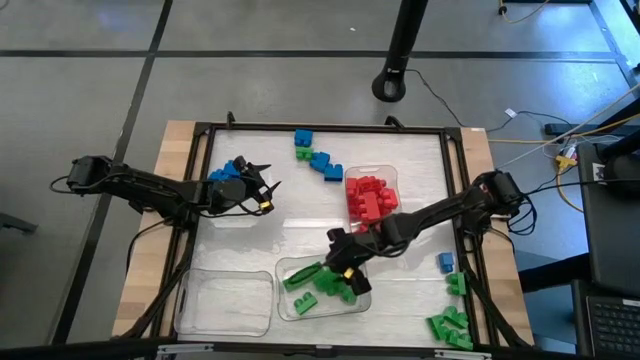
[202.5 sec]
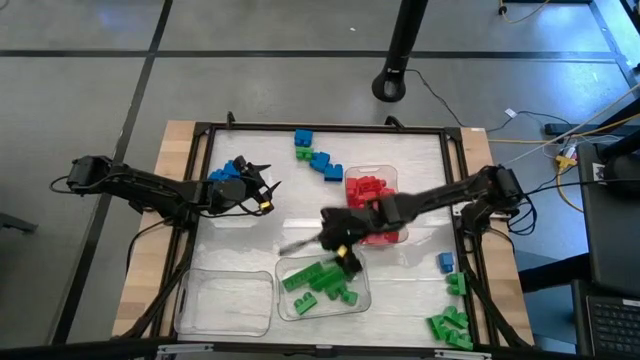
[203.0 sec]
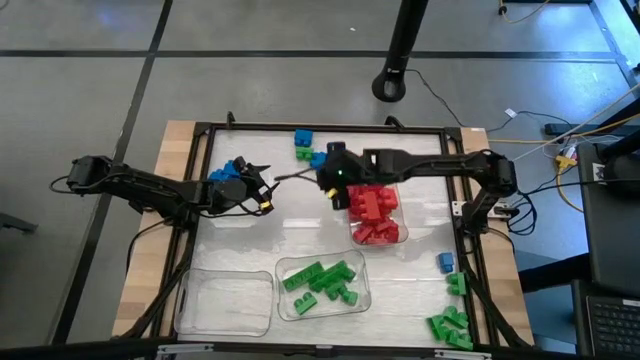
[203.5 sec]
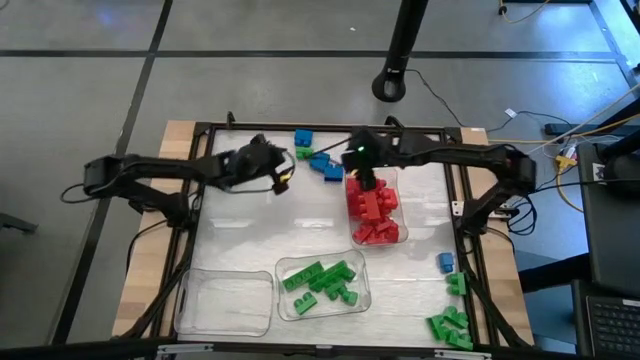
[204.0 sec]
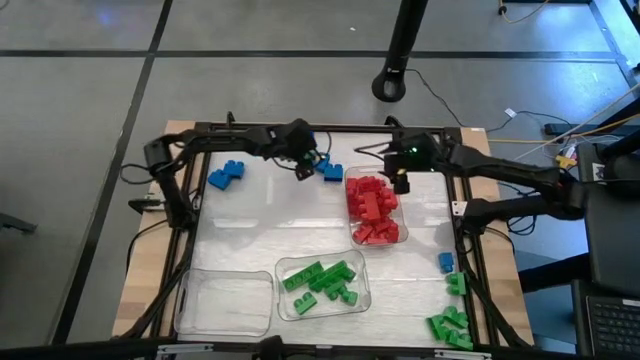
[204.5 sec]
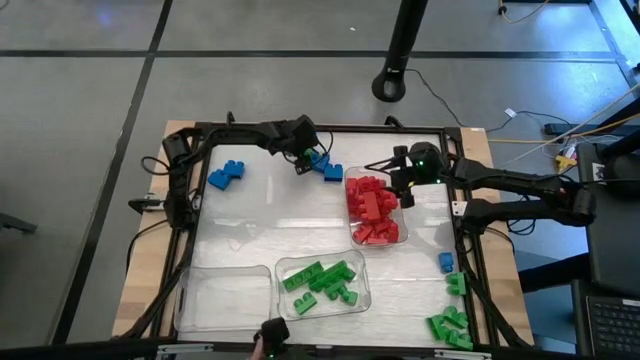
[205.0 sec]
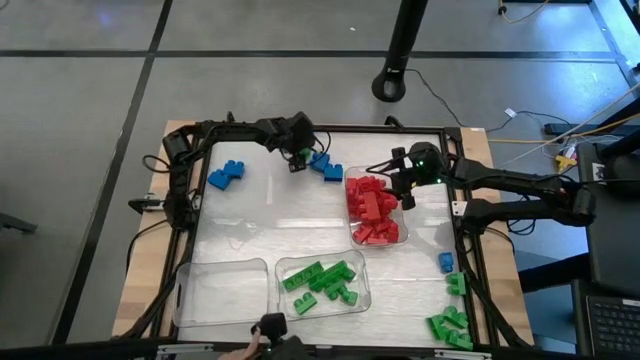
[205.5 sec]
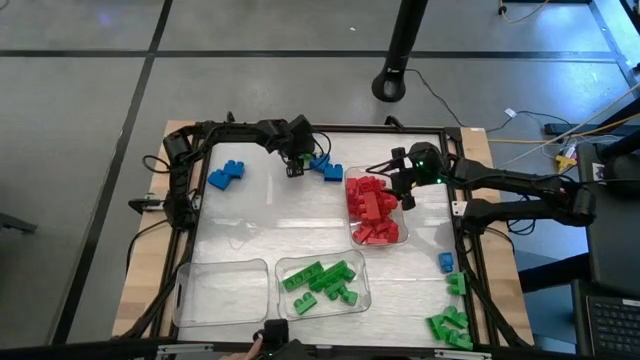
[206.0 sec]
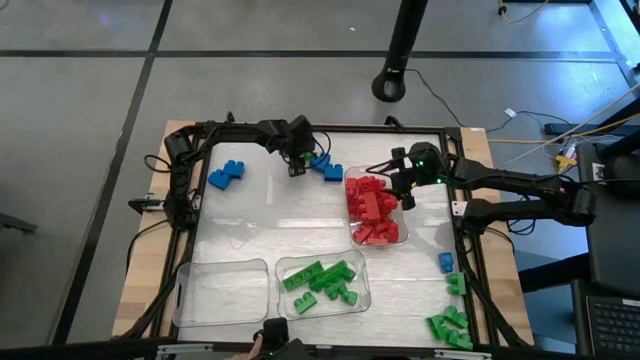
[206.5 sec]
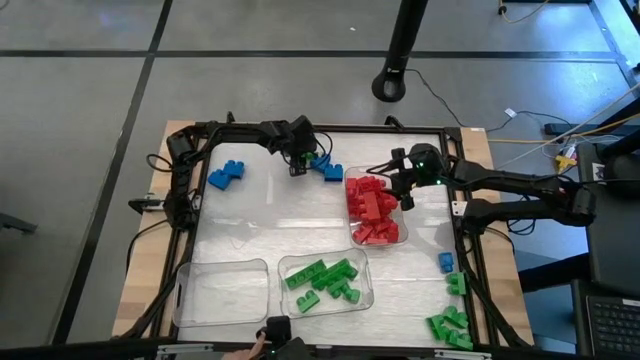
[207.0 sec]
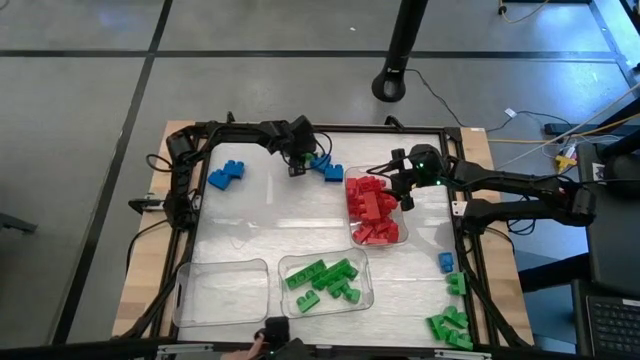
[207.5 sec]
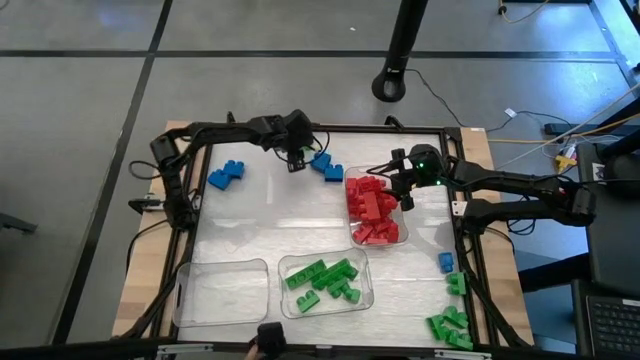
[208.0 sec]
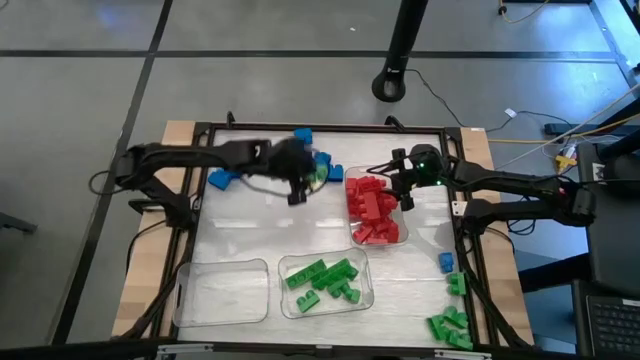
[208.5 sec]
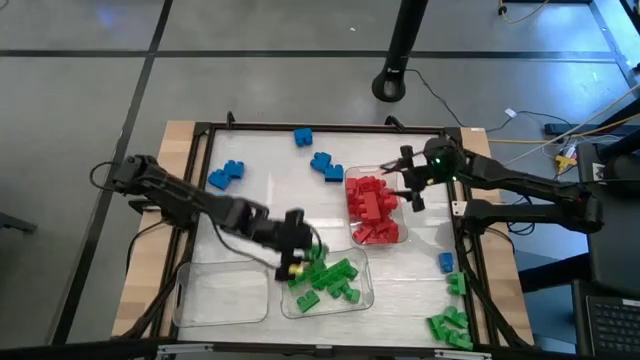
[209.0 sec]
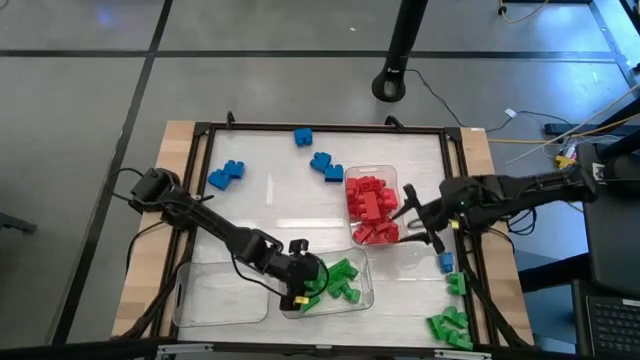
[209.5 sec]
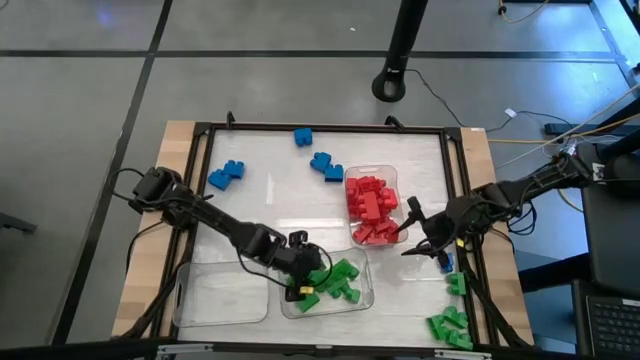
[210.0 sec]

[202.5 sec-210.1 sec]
Task: Sort blocks
Put the green game piece into the bottom right transparent bin

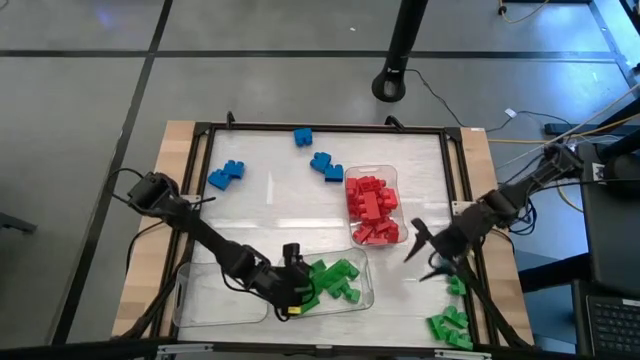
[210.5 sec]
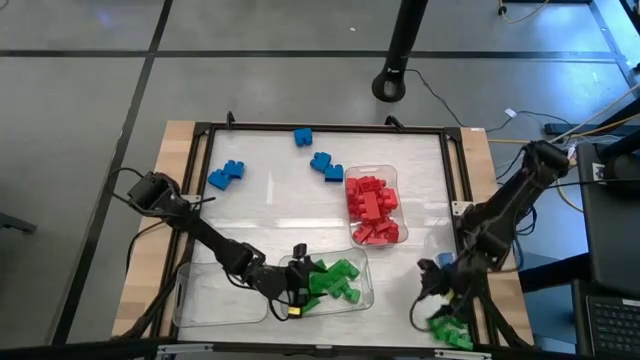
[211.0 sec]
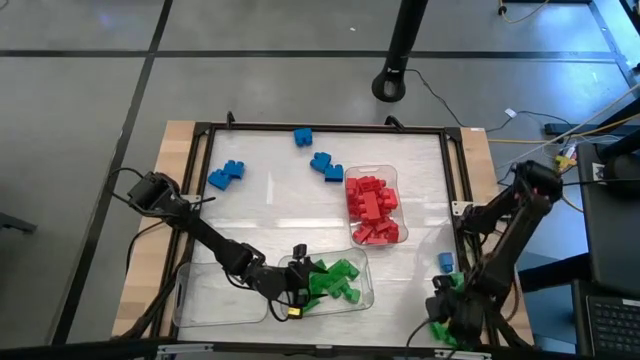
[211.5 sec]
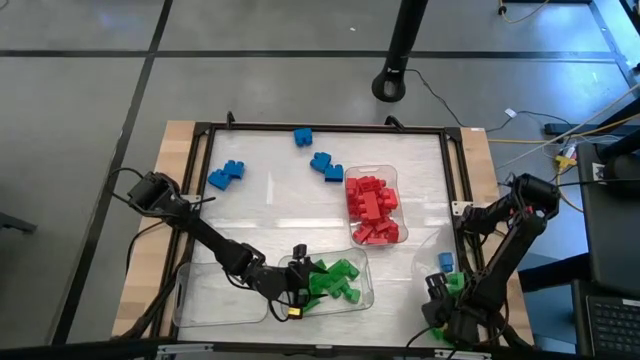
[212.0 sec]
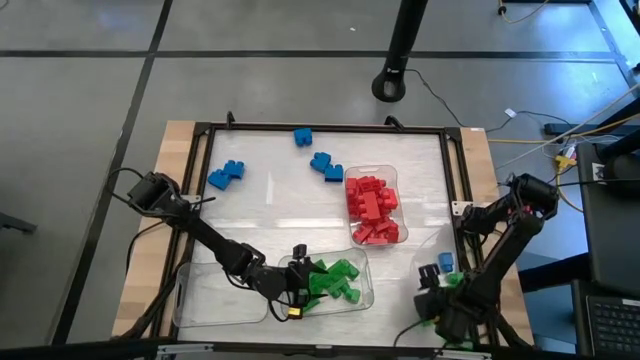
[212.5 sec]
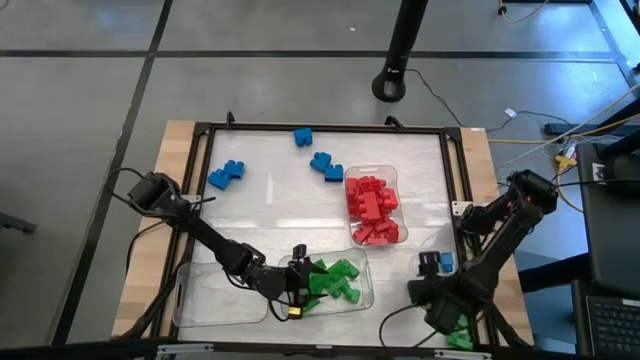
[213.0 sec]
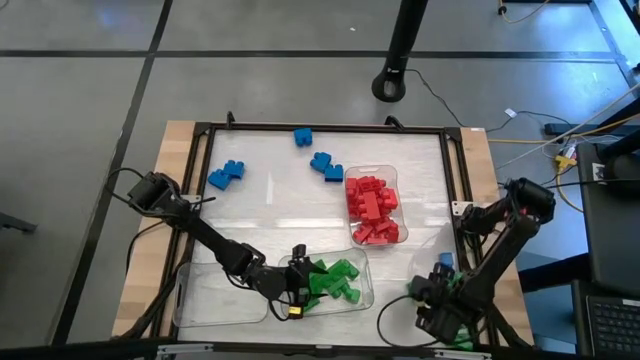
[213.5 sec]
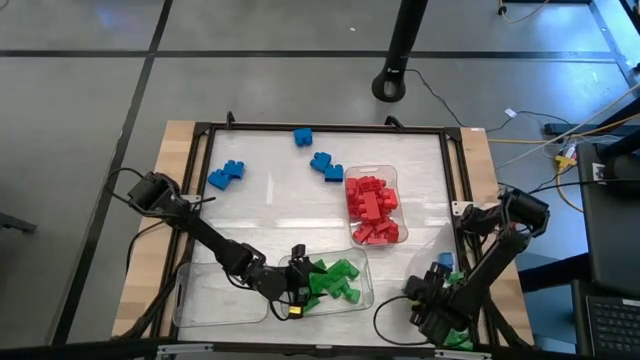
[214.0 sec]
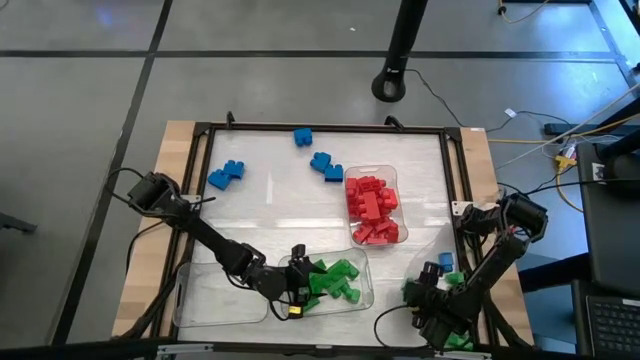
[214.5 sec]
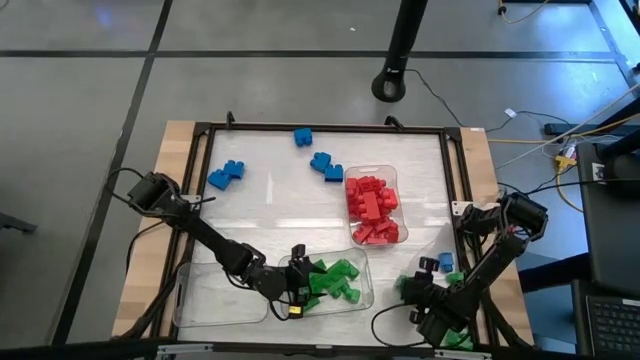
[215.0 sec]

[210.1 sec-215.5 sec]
Put the green game piece into the bottom right transparent bin

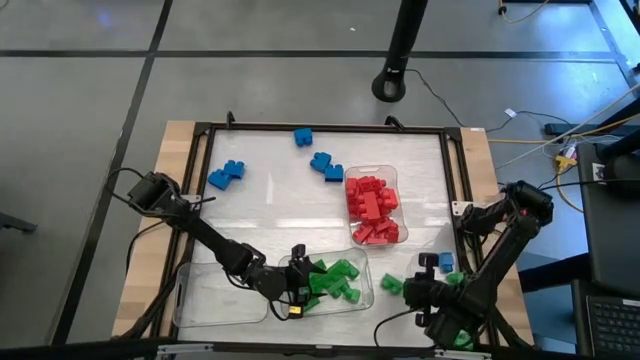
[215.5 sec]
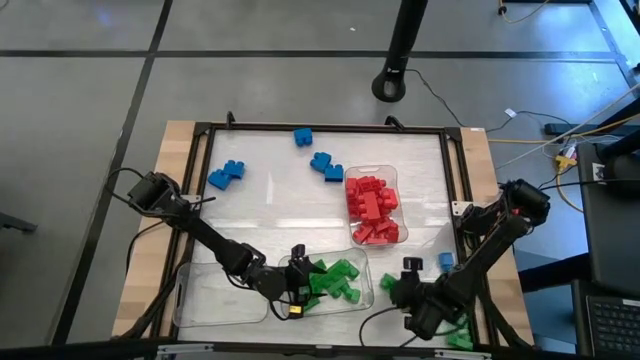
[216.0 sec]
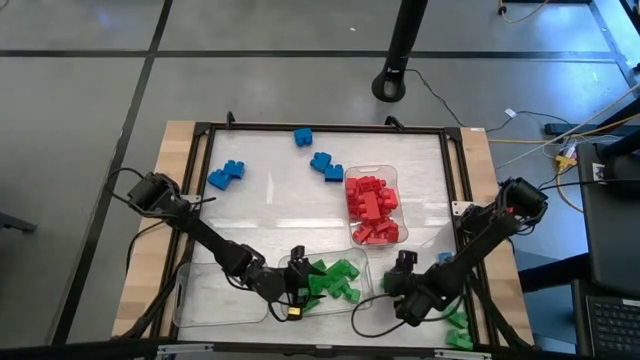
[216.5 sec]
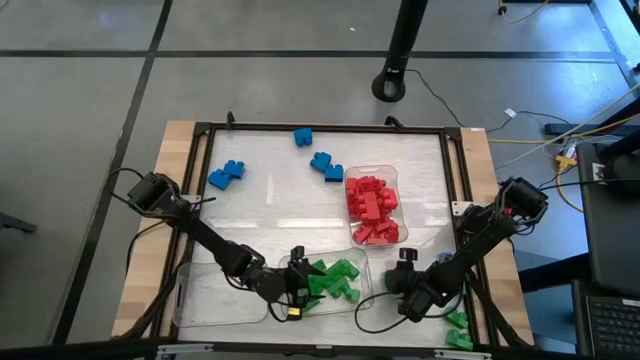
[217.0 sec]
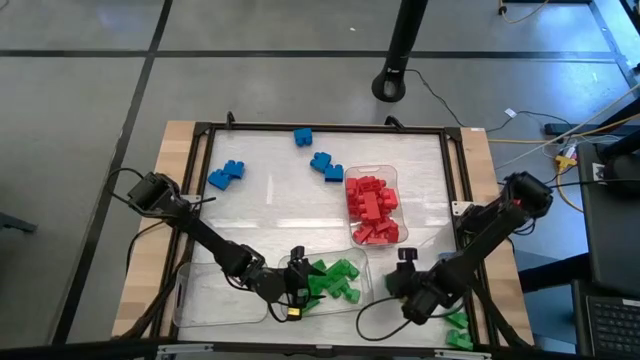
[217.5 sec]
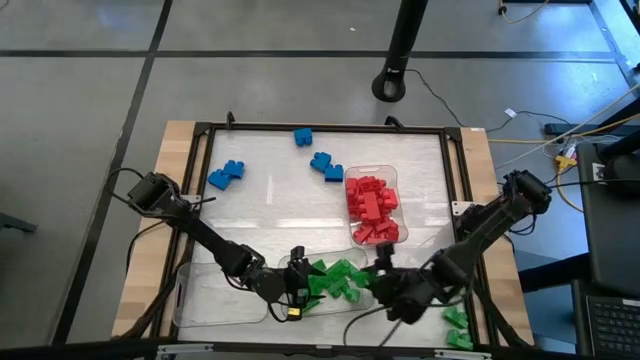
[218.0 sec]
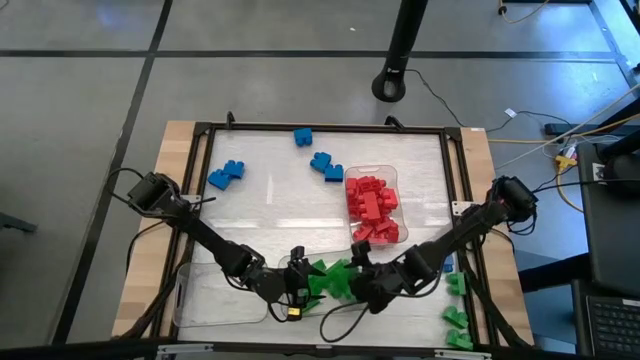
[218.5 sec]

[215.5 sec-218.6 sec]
Put the green game piece into the bottom right transparent bin

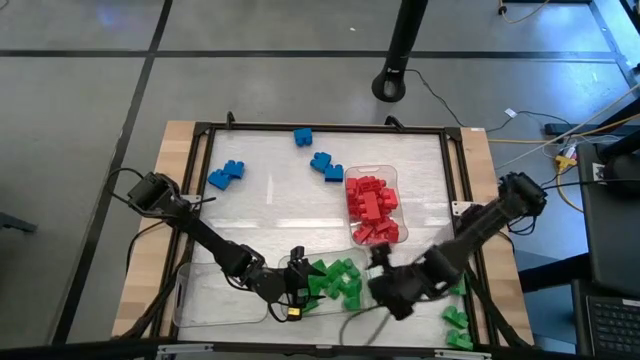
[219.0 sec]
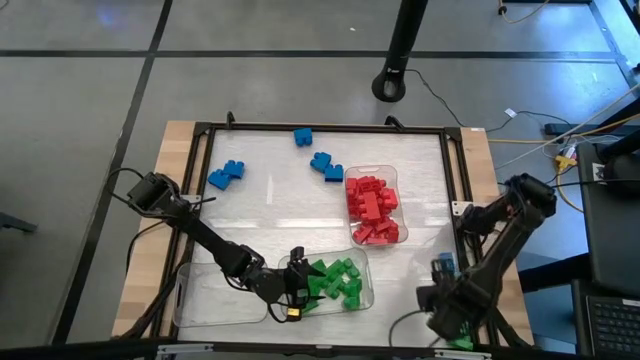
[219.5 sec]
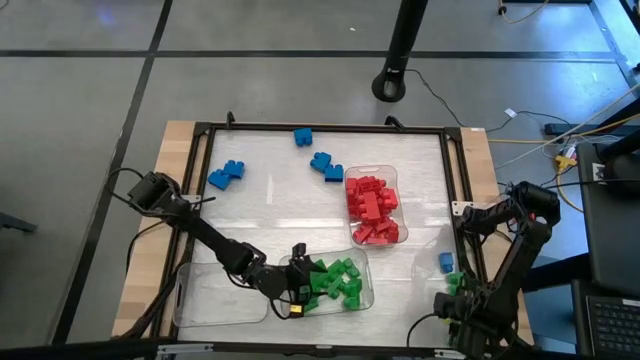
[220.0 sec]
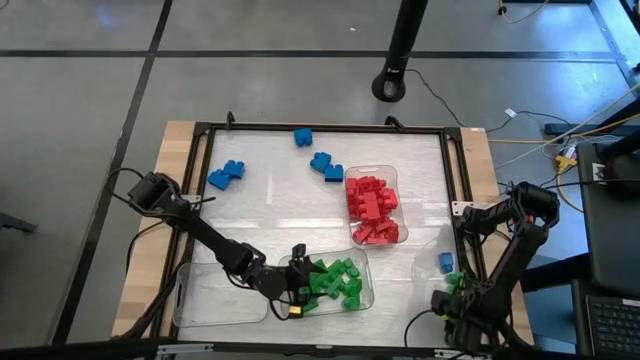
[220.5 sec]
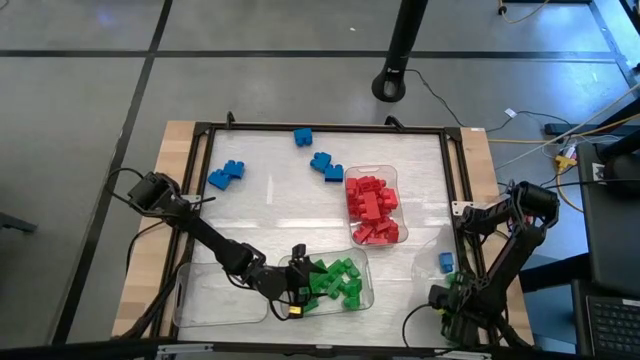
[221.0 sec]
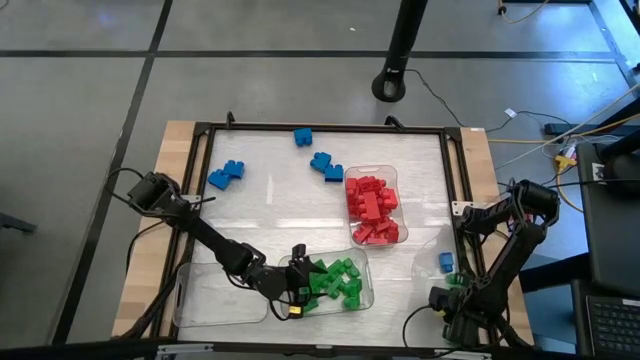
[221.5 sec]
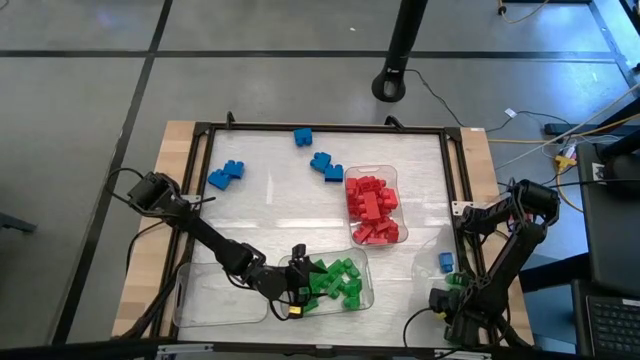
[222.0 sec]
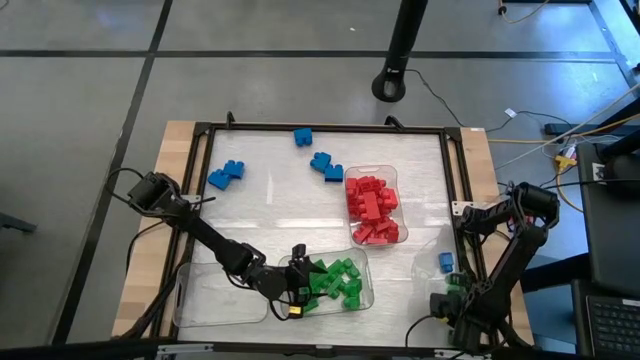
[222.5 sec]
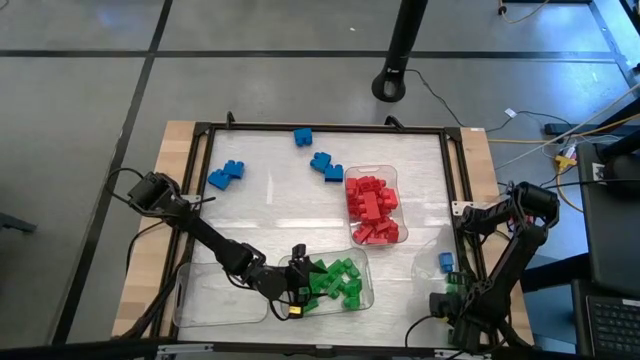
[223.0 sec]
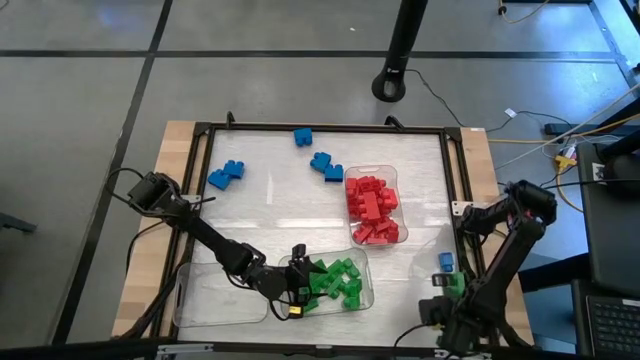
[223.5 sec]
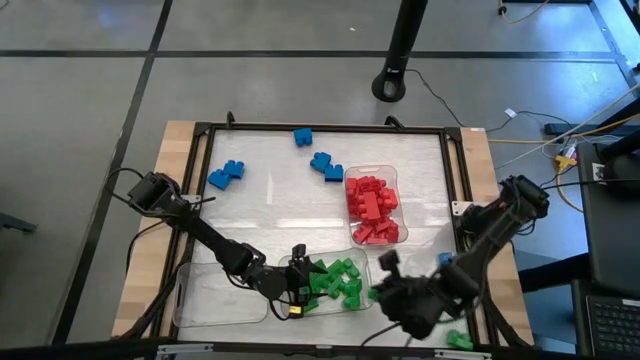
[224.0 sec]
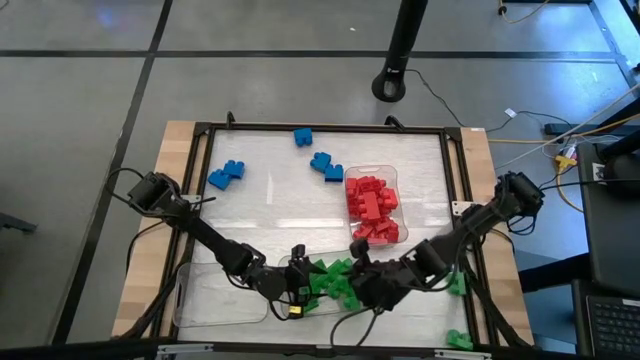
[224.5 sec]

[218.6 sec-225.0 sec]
Put the green game piece into the bottom right transparent bin
